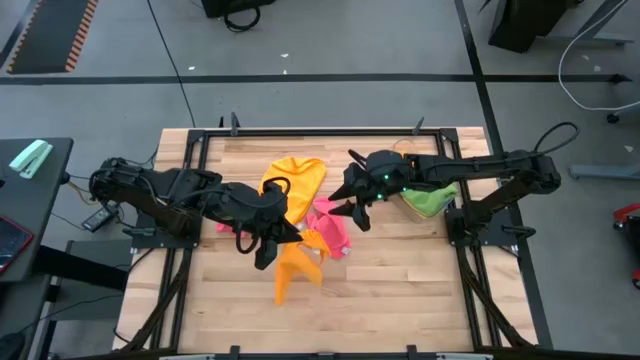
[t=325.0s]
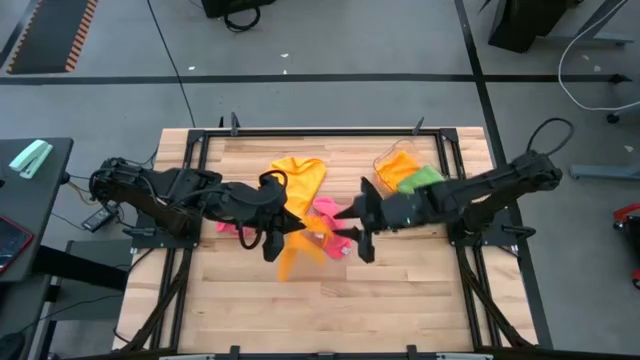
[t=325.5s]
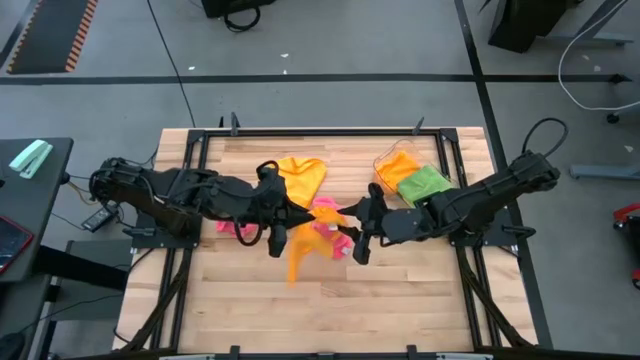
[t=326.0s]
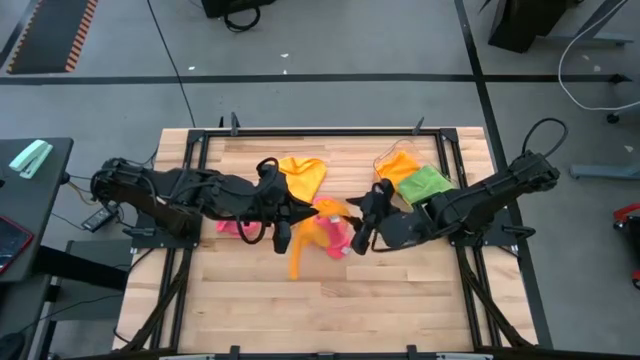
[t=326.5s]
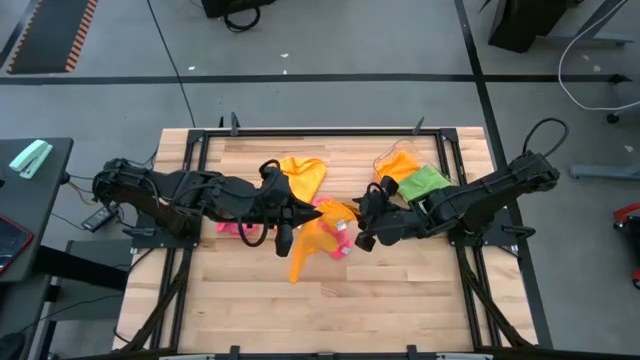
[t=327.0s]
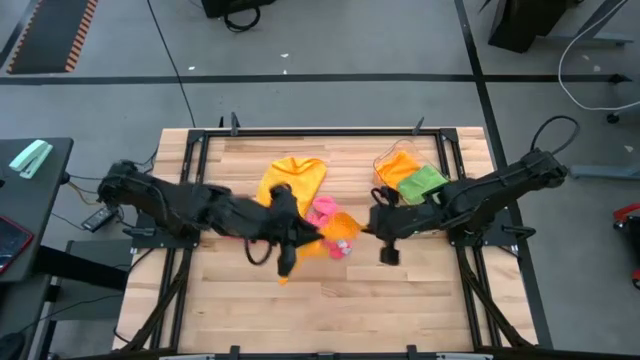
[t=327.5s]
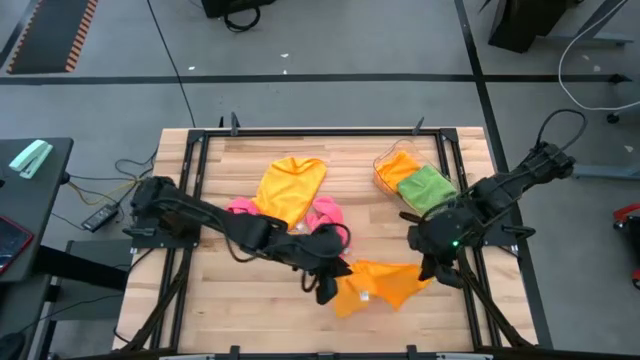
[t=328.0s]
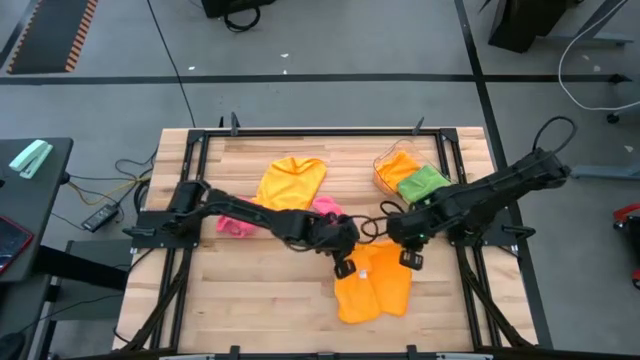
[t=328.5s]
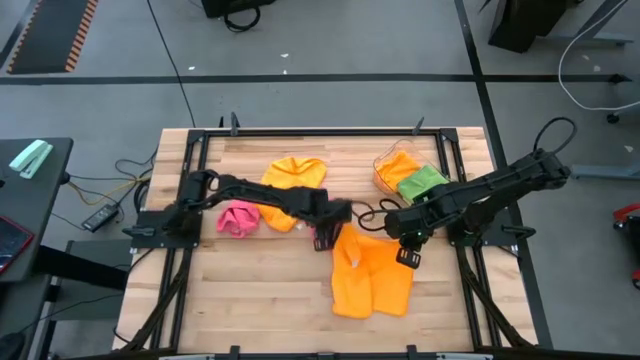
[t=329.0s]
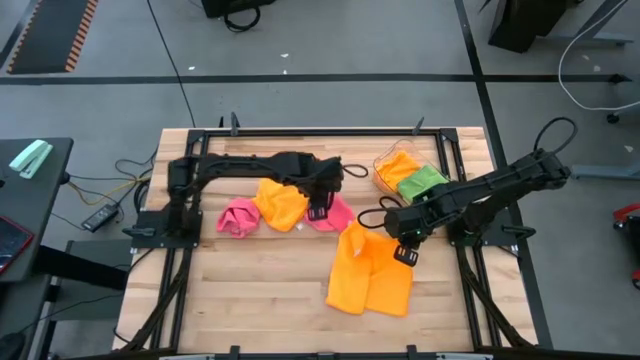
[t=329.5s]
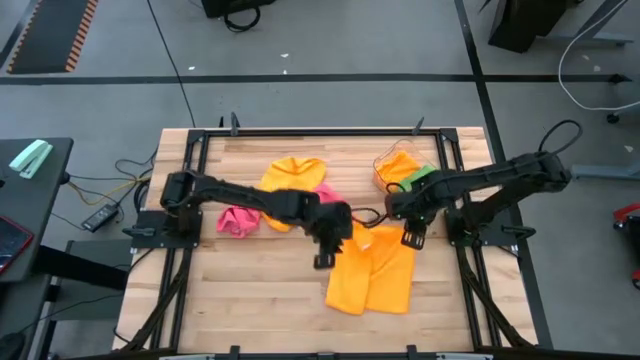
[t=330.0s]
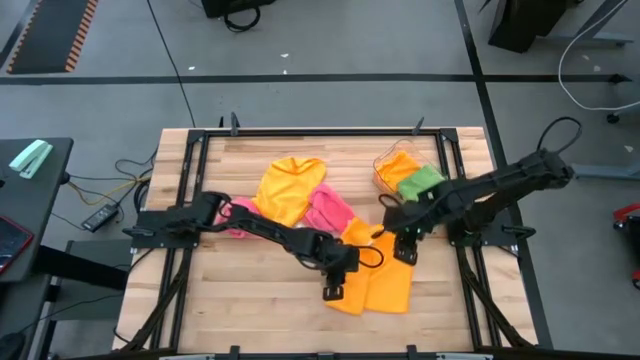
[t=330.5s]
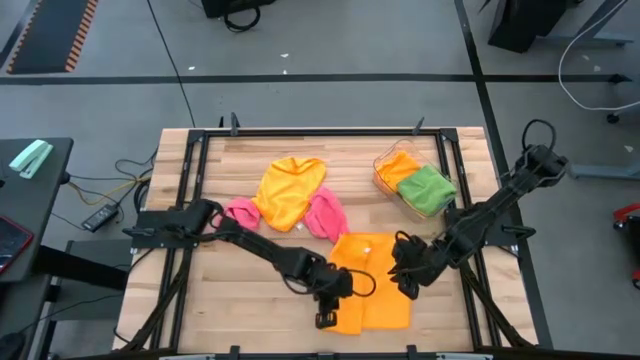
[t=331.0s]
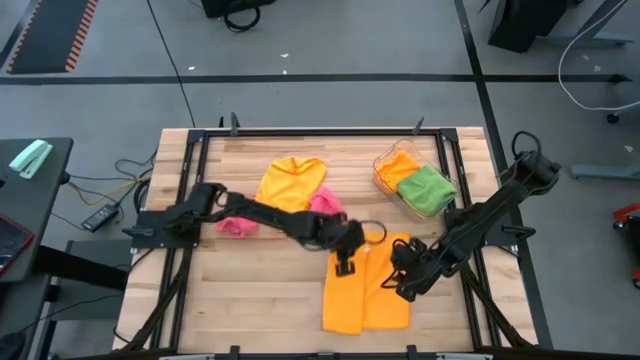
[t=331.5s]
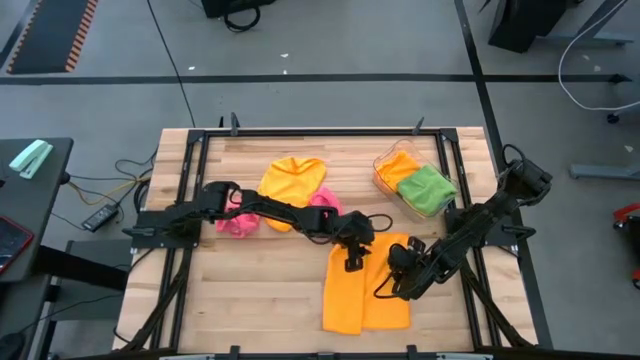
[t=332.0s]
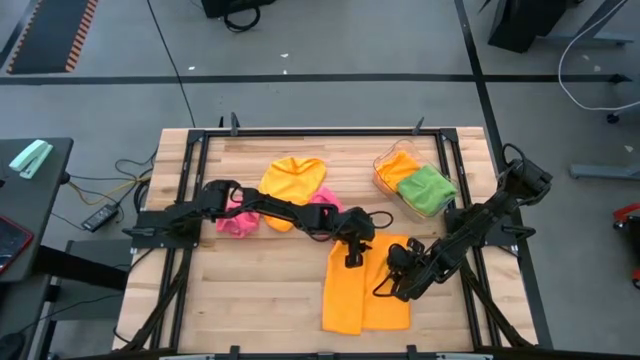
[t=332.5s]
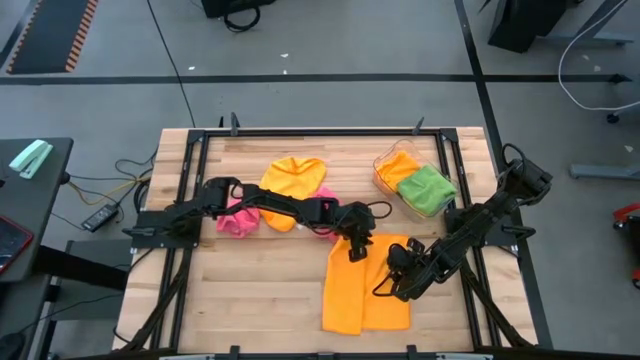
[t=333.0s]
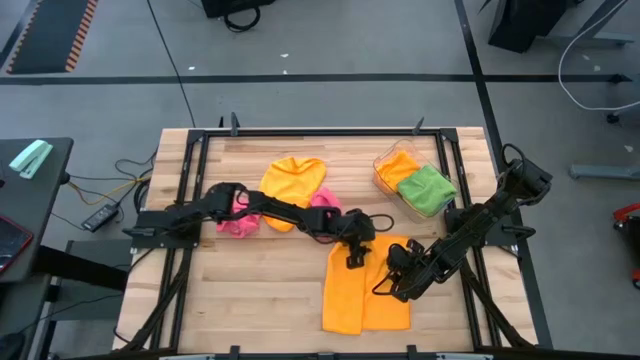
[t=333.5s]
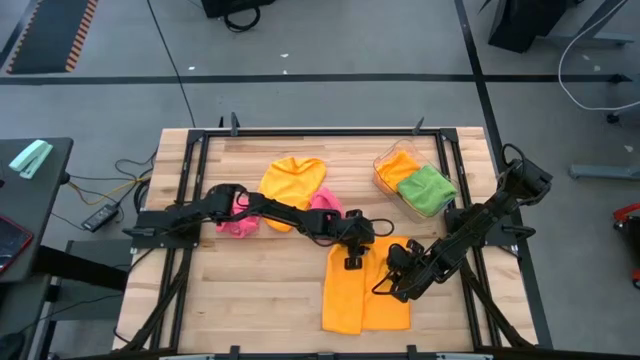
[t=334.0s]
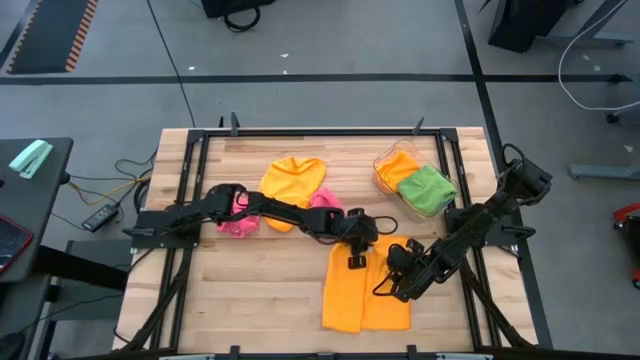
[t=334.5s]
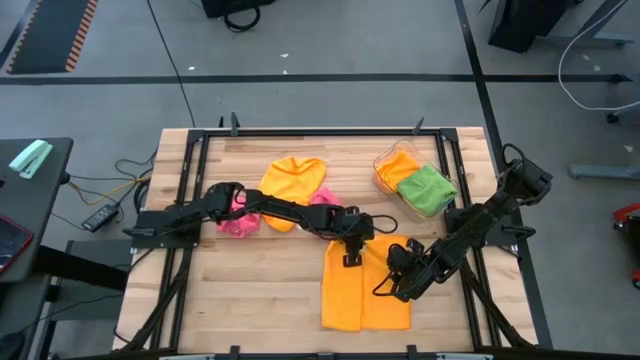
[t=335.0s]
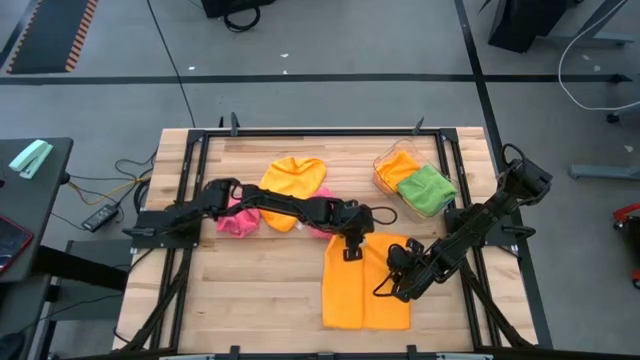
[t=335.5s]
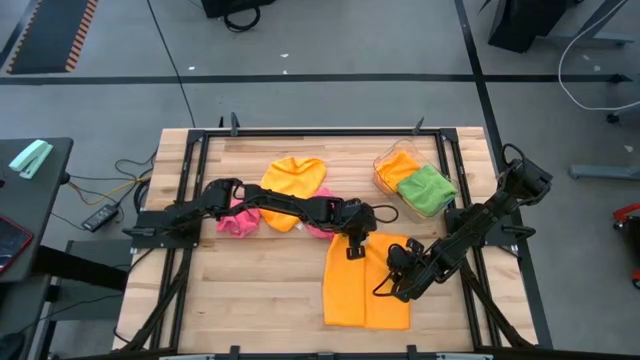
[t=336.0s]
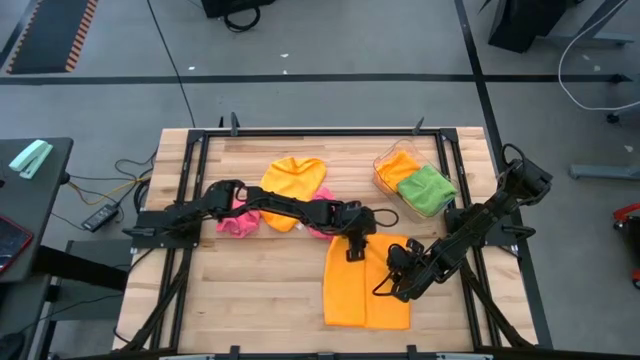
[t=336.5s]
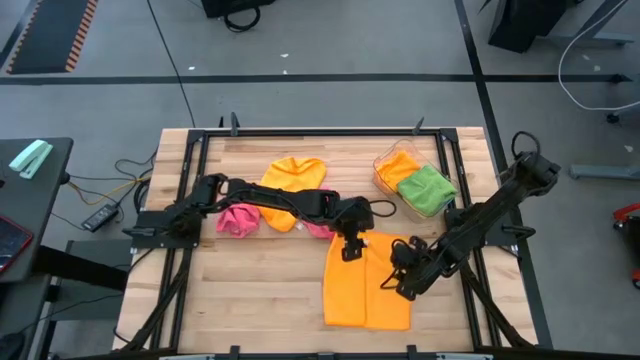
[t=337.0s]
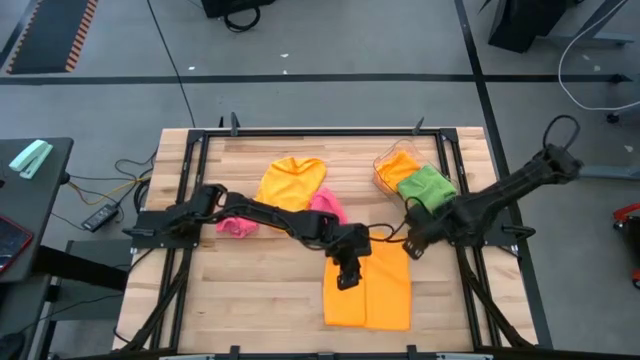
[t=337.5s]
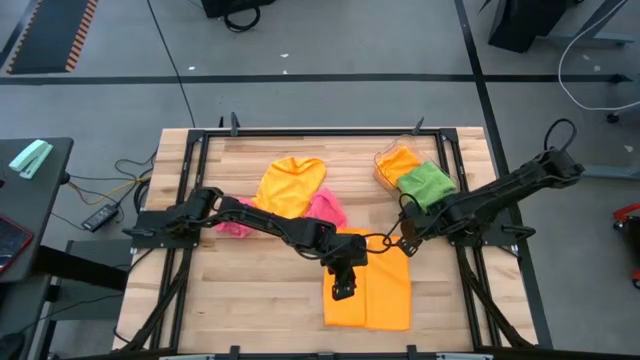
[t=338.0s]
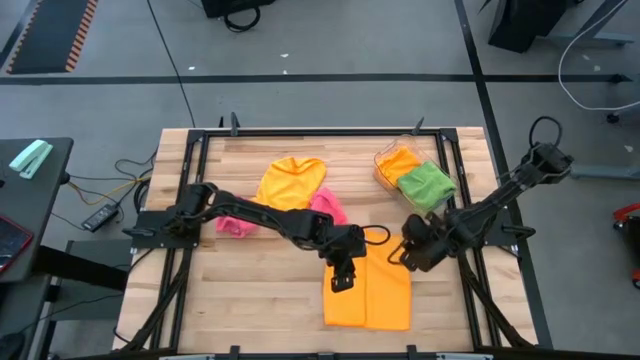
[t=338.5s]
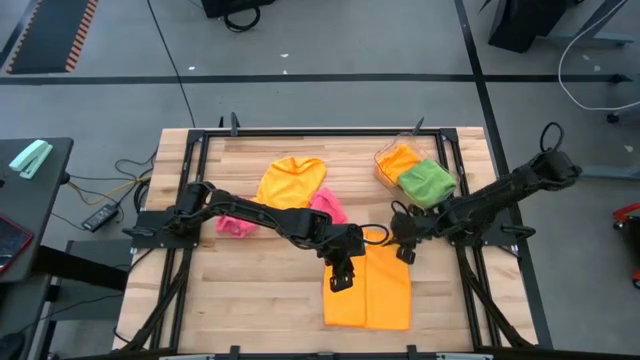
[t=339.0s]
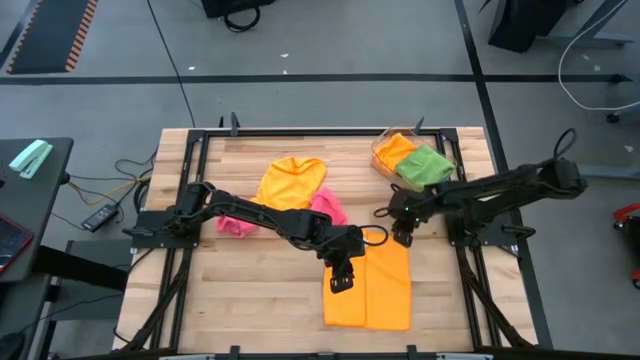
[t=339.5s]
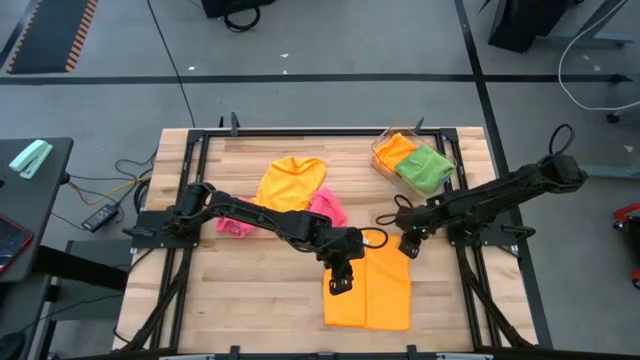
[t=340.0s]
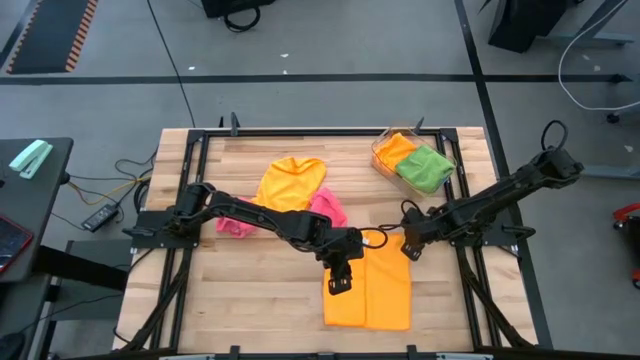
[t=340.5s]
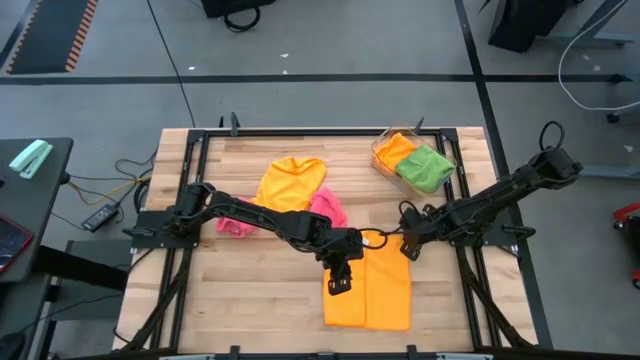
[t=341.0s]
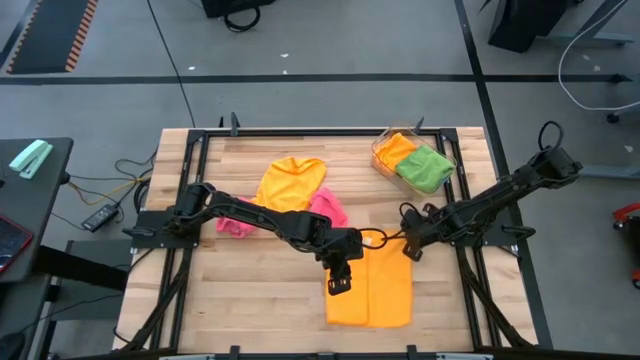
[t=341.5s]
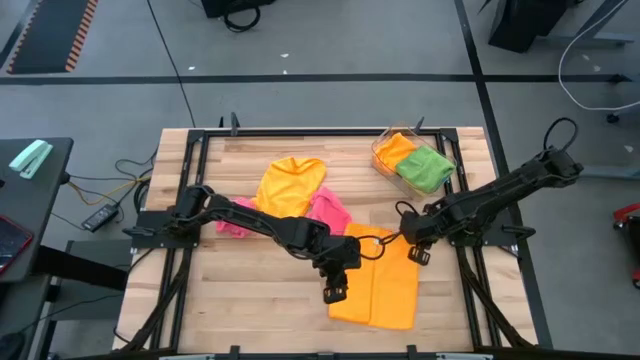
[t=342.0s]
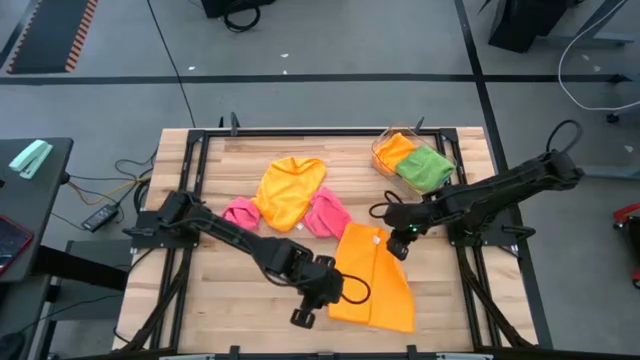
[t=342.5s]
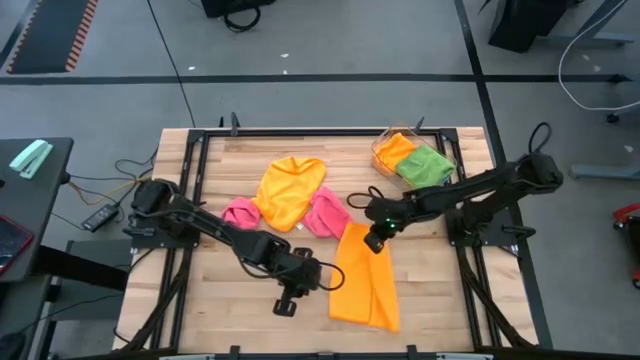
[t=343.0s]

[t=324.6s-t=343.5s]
Task: Fold microfiber towels
Fold the bottom orange towel

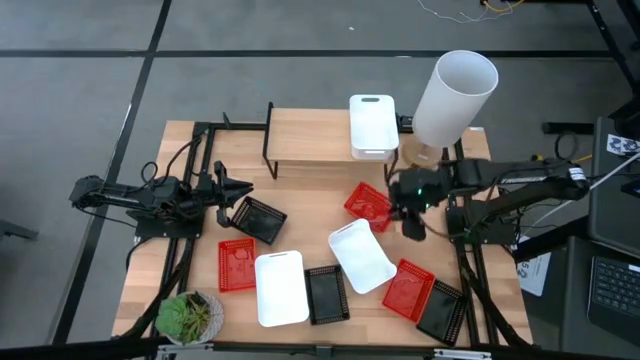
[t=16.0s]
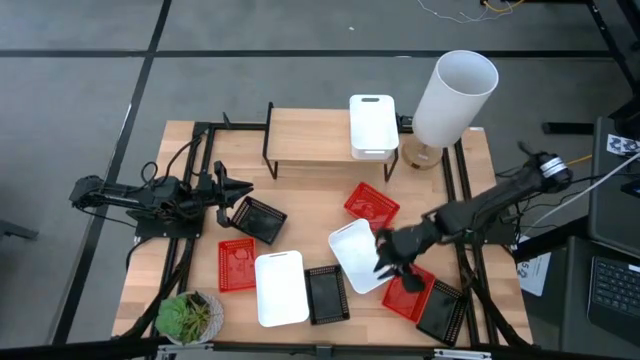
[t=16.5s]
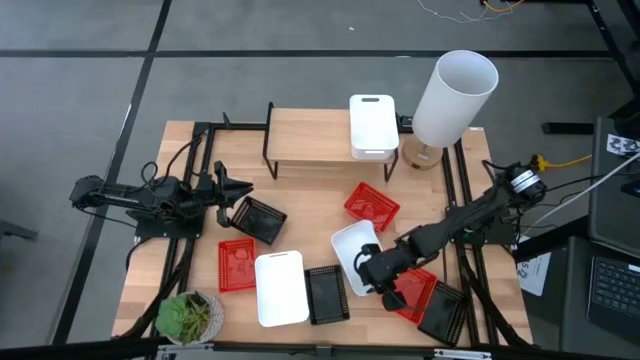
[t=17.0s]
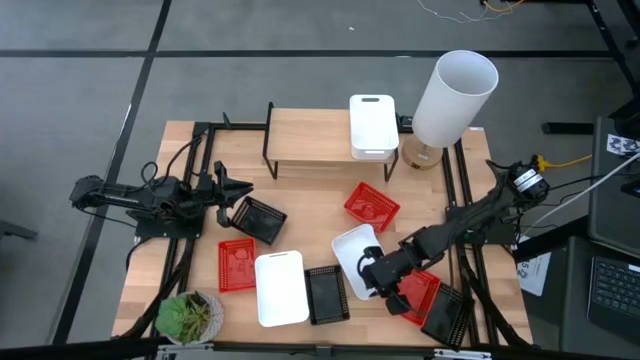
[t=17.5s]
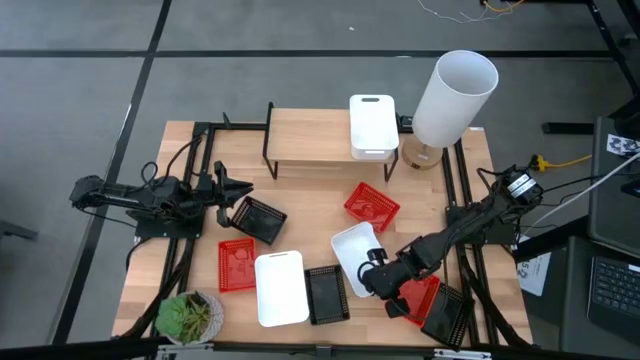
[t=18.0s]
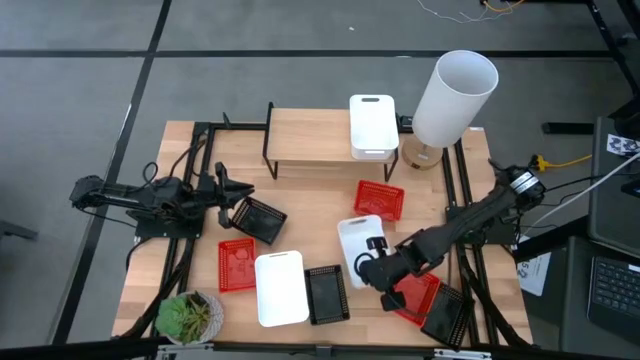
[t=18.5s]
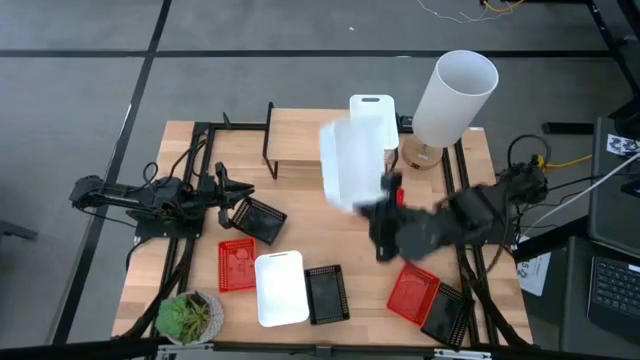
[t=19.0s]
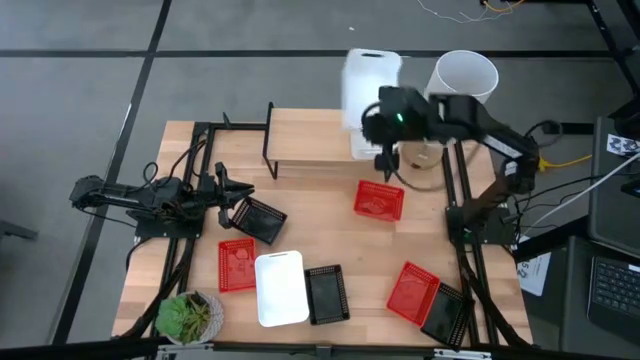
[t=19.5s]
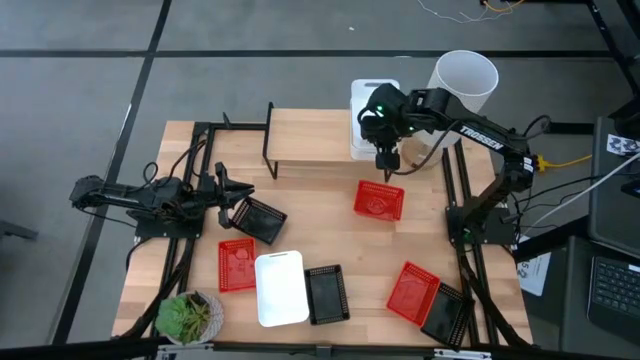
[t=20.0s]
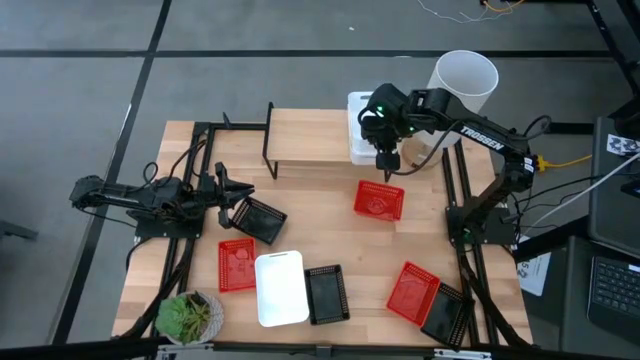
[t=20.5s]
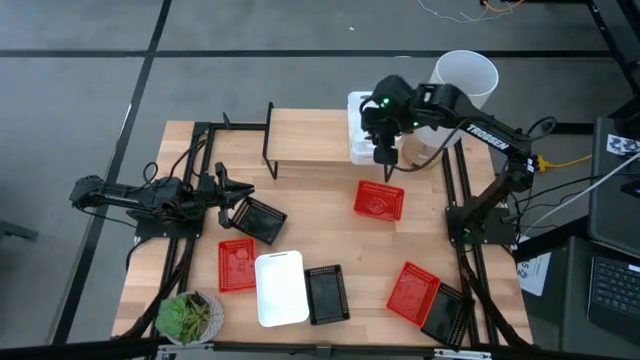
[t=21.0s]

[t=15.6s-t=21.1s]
Task: Stack baskets on shelf by color
Stack the right white bin on top of the white bin on the shelf
